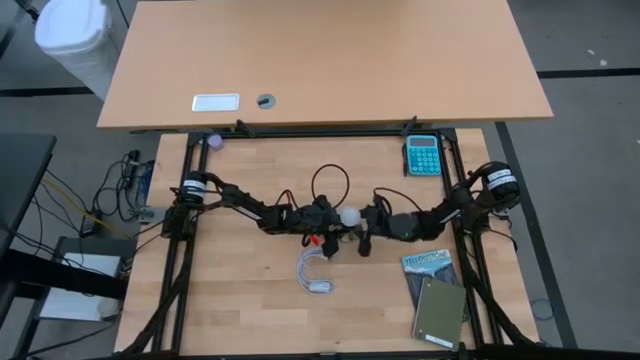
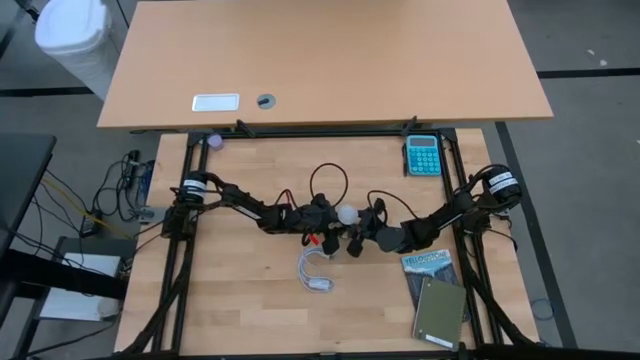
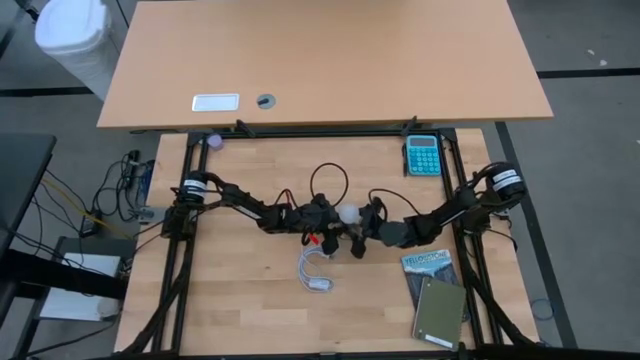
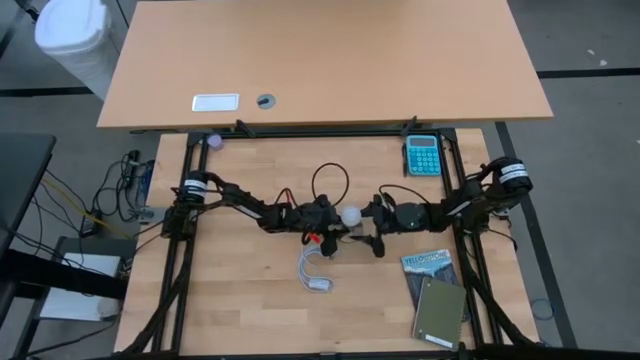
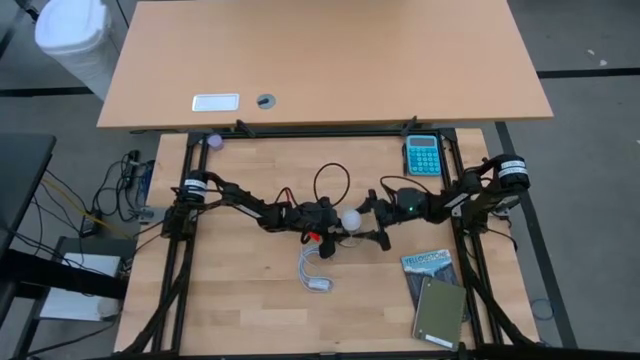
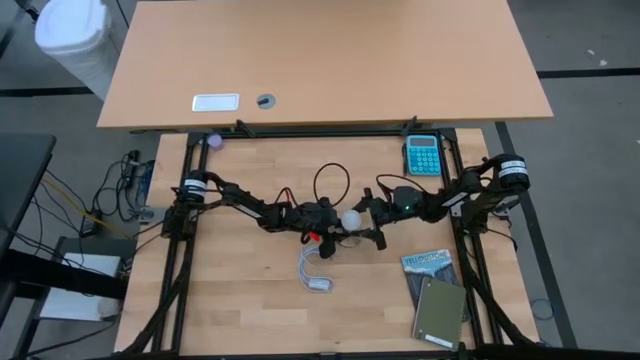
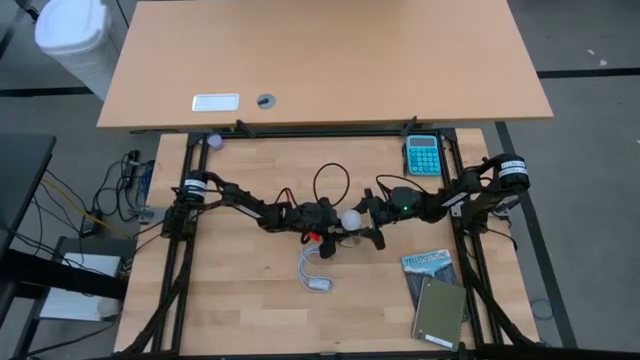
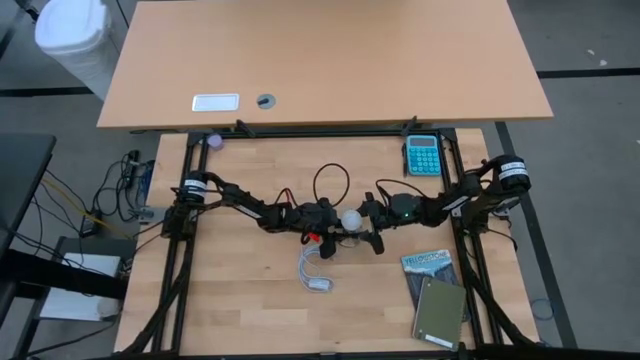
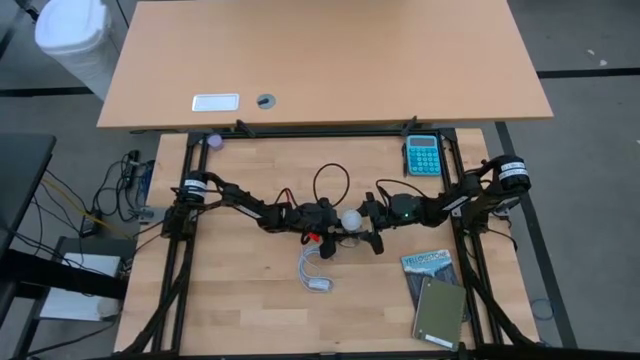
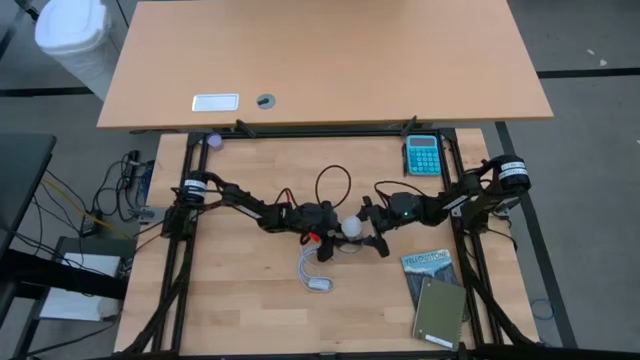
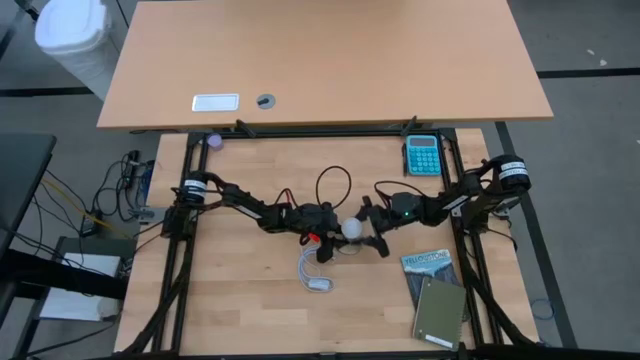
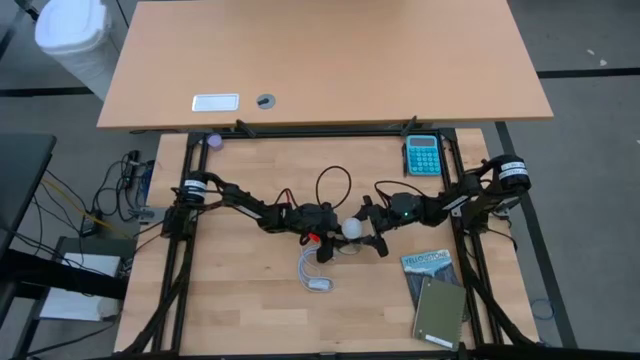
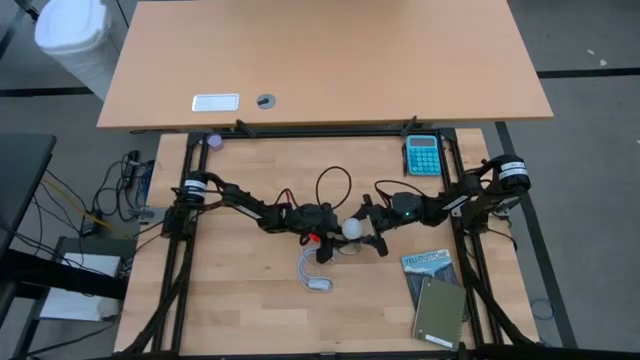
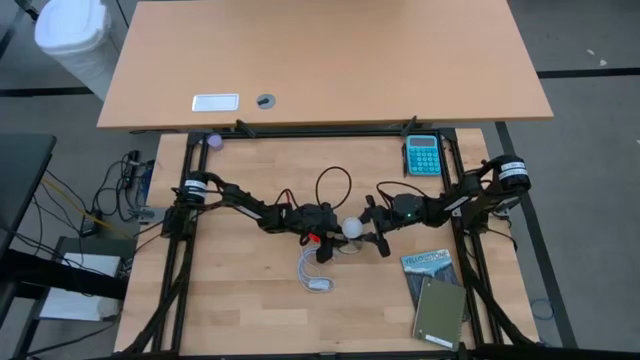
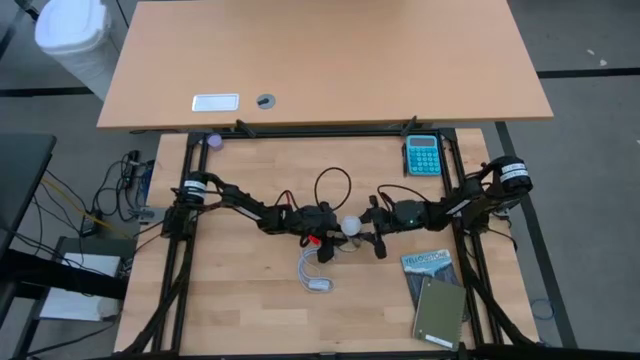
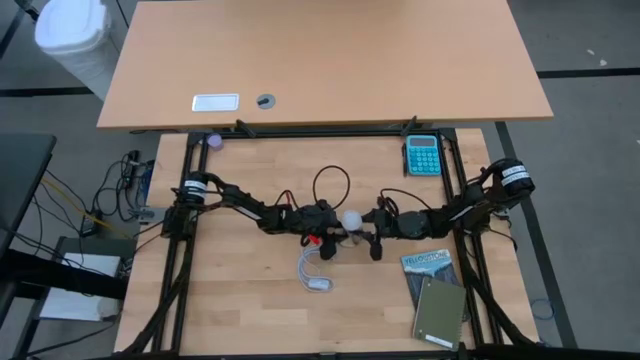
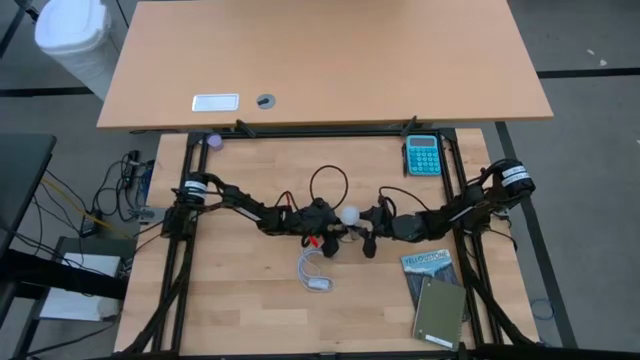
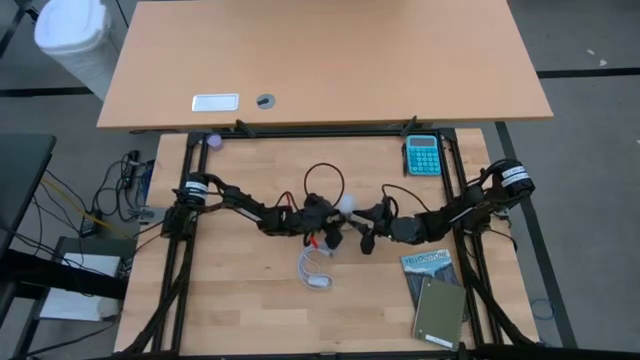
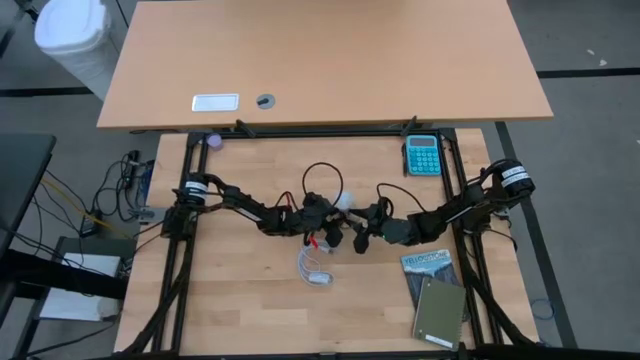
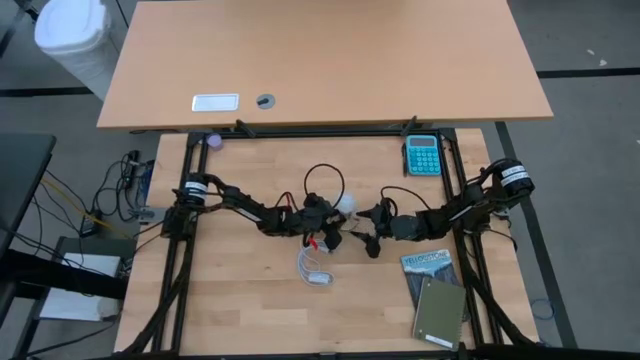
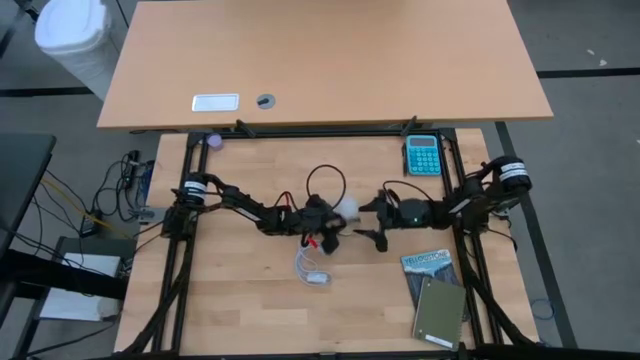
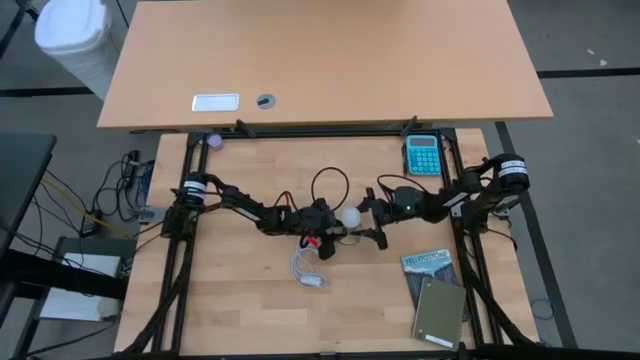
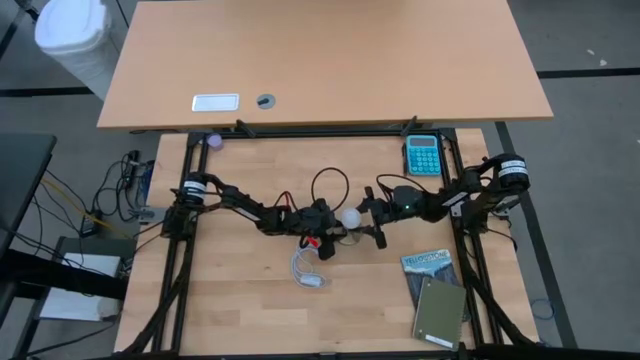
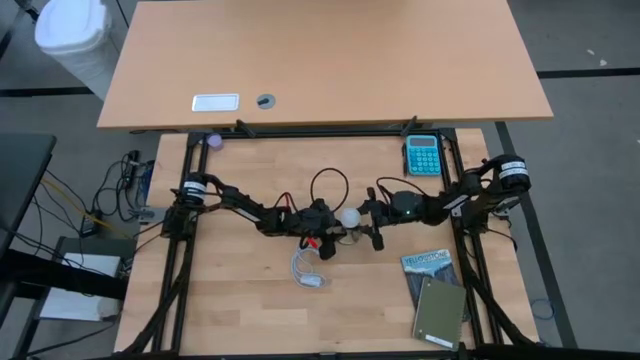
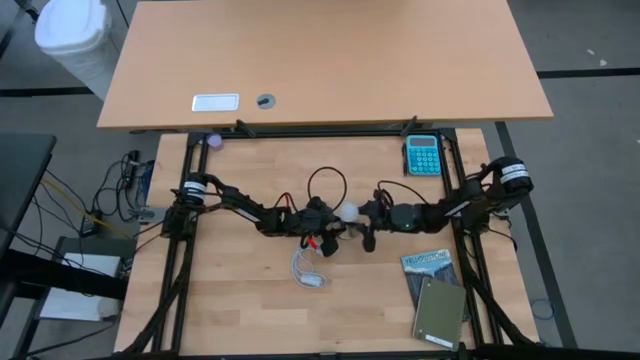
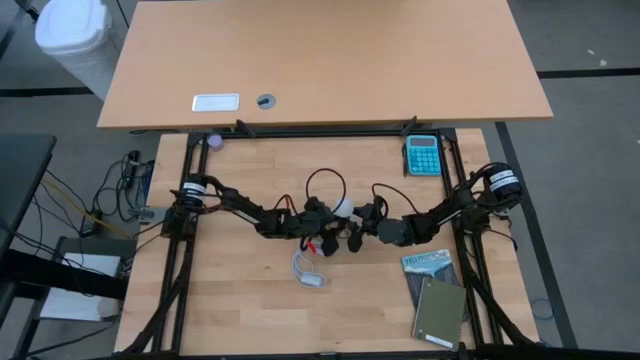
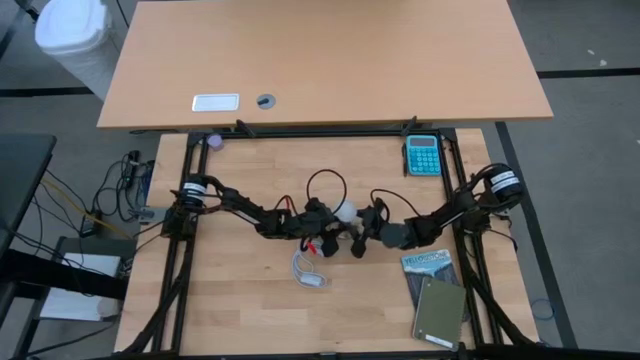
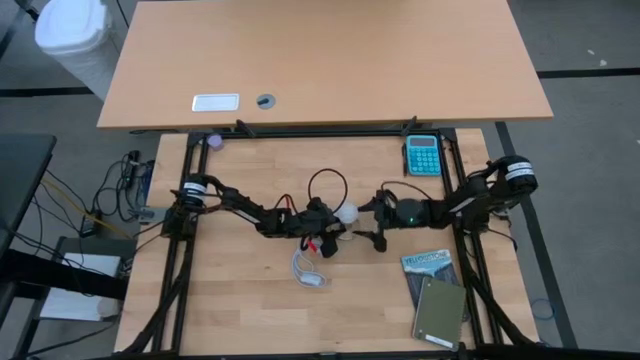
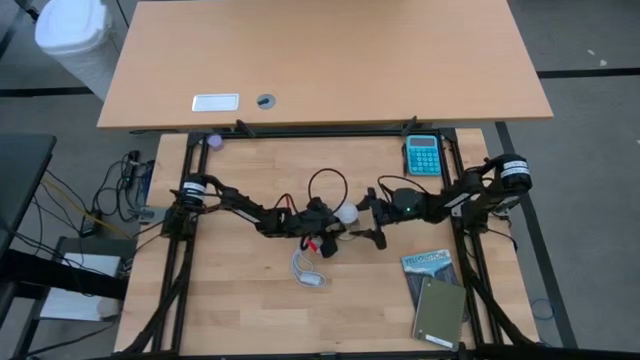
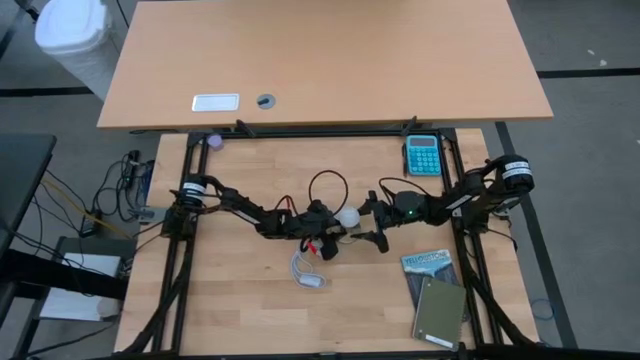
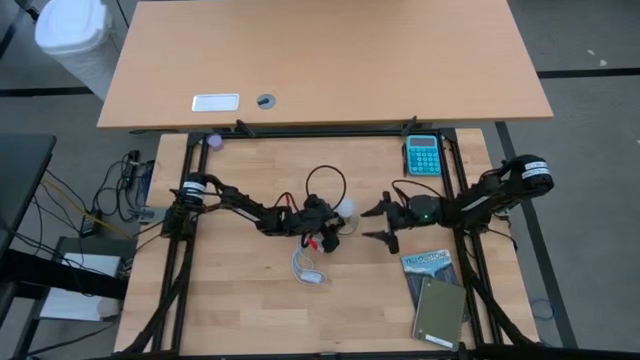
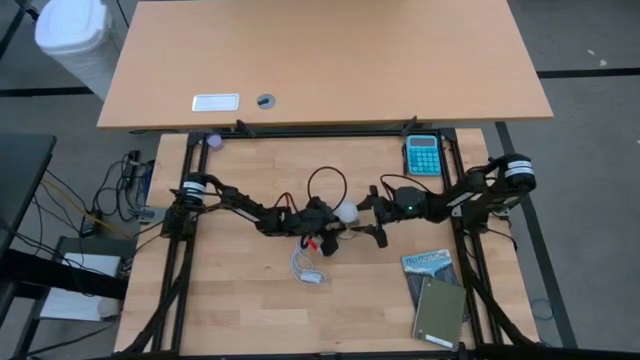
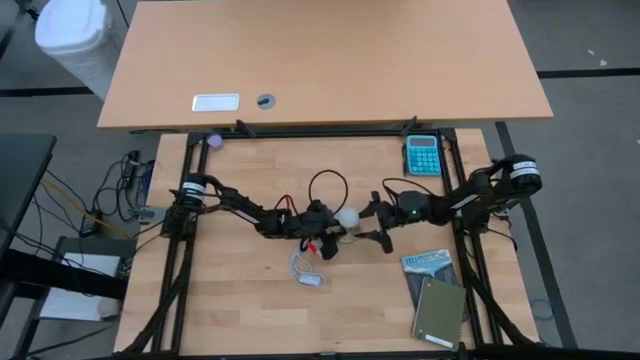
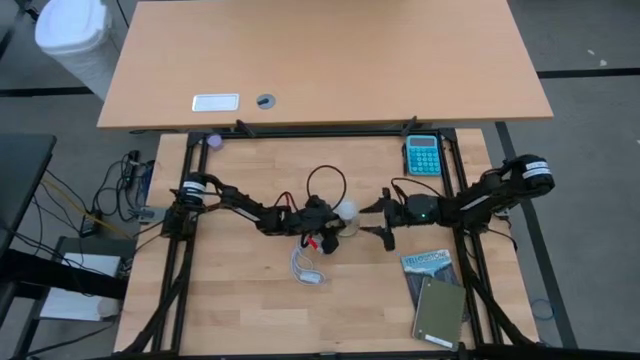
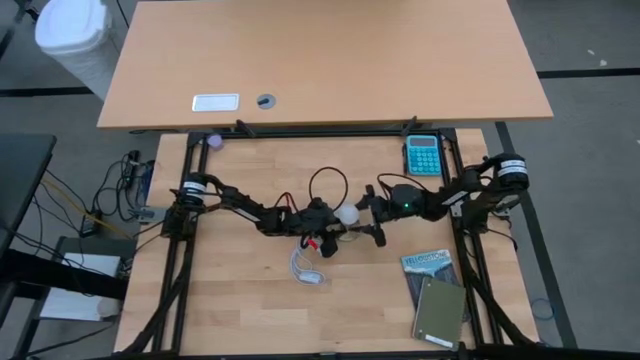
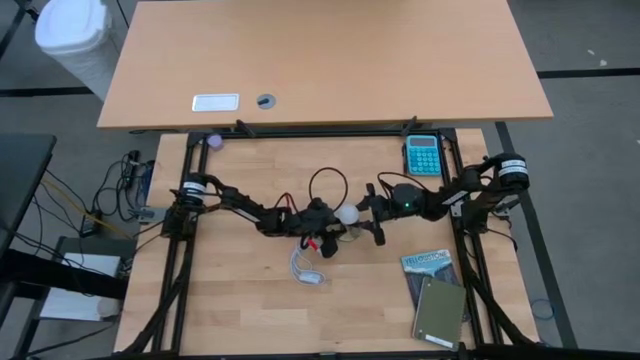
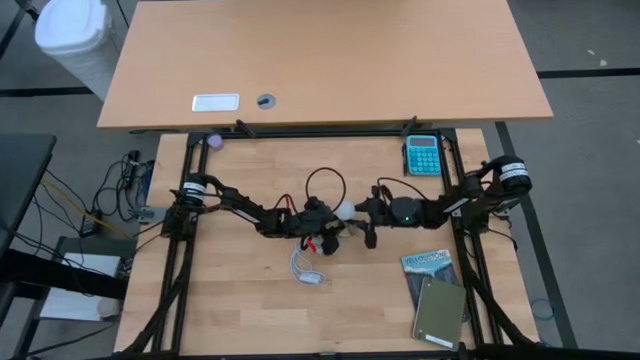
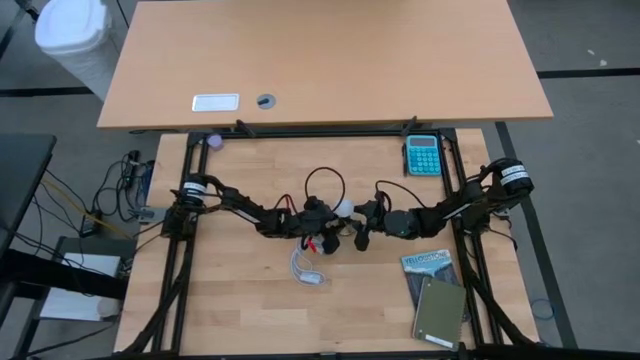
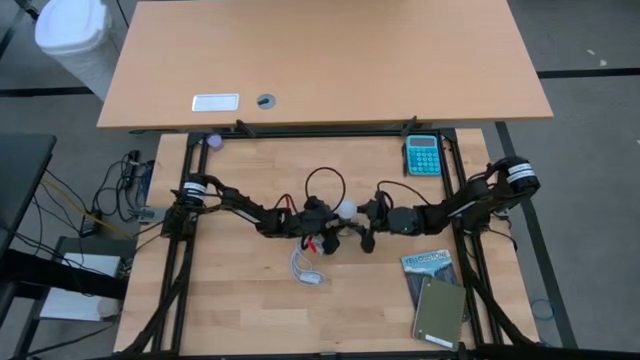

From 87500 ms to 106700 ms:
Task: Screw lightbulb
Insert the lightbulb into the desk lamp

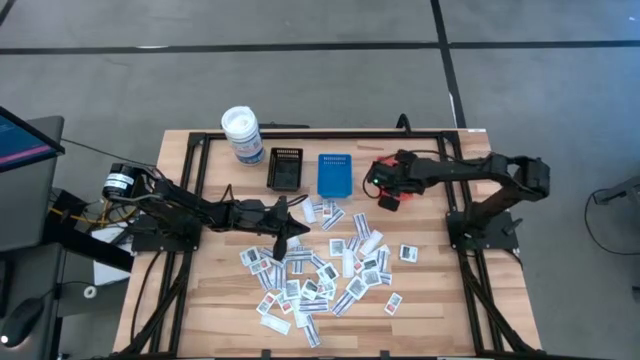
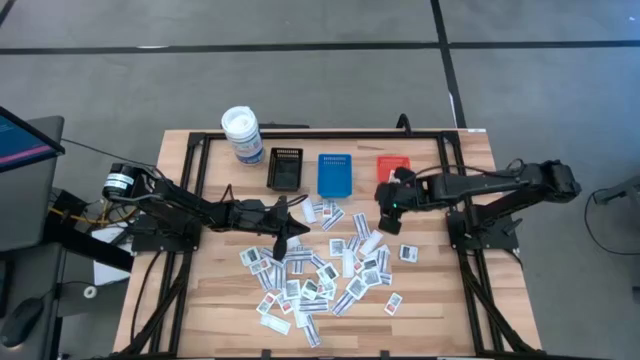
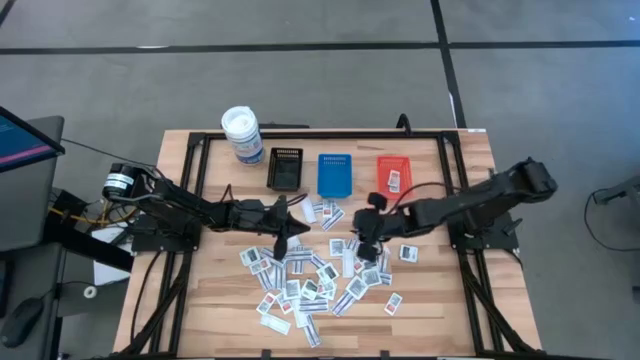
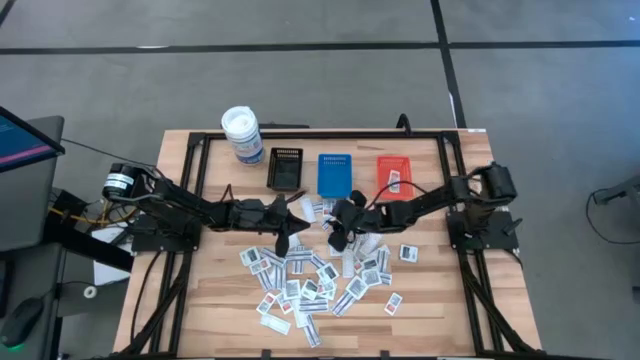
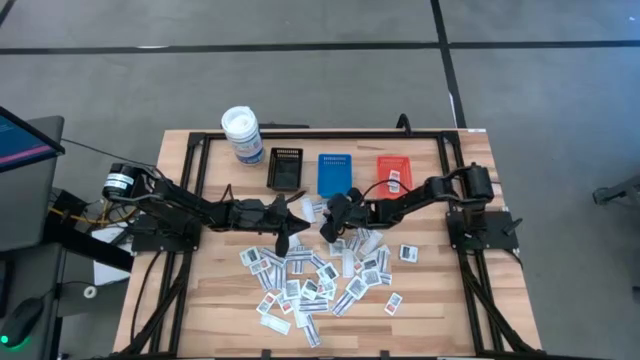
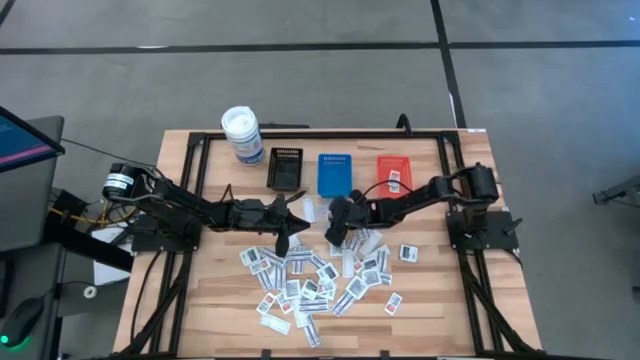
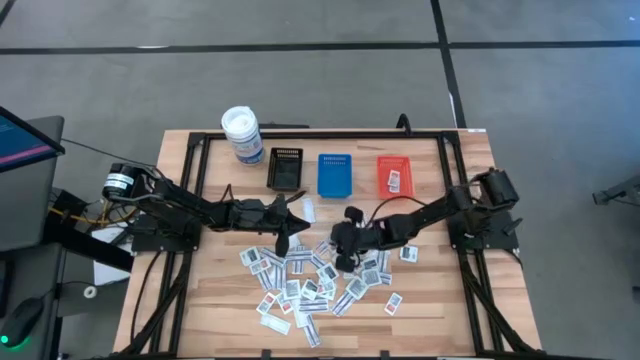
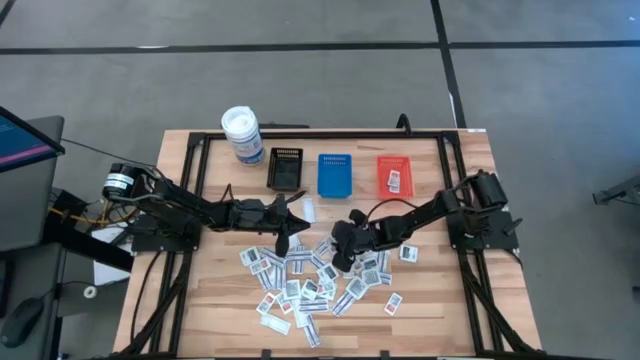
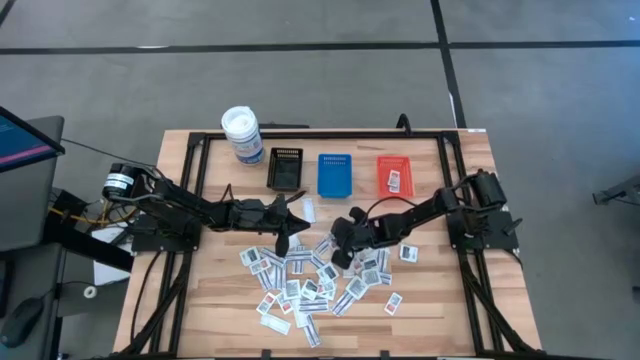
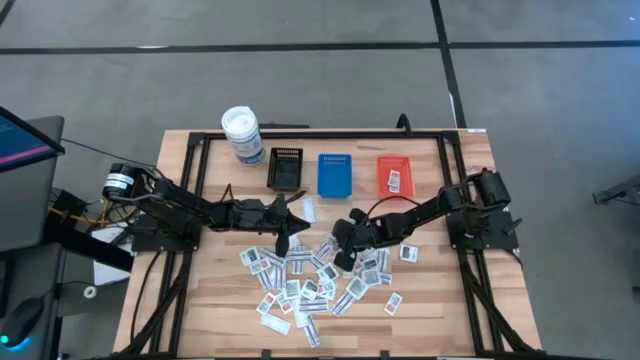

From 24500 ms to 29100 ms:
Task: Pick & Place First Aid Supplies
Put the orange ointment pack into the orange bin
